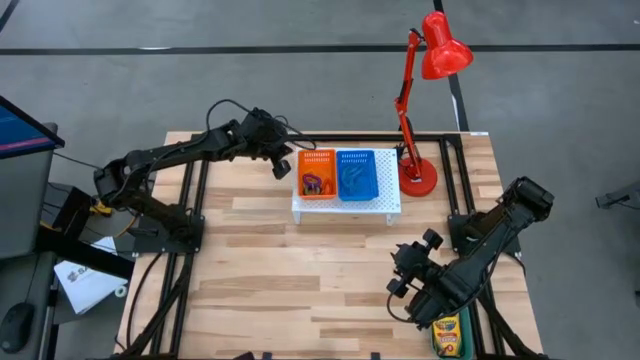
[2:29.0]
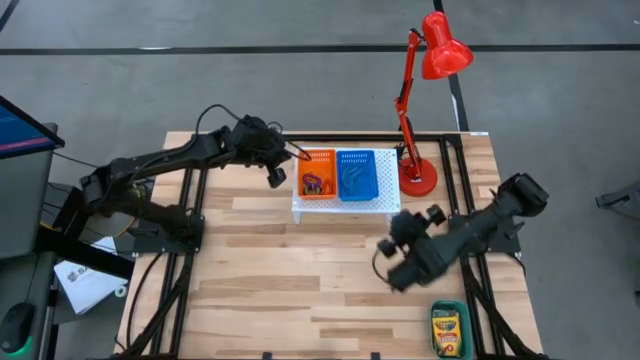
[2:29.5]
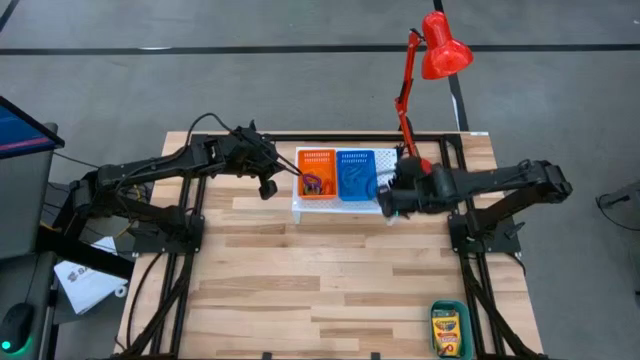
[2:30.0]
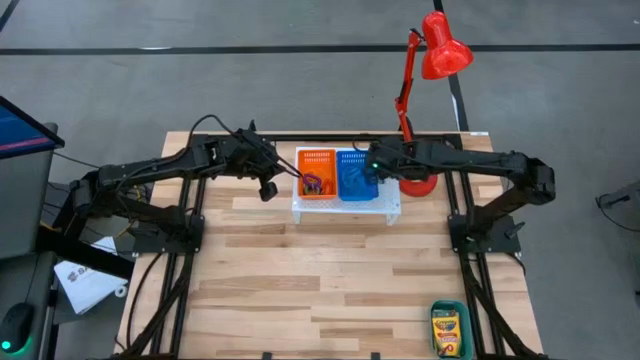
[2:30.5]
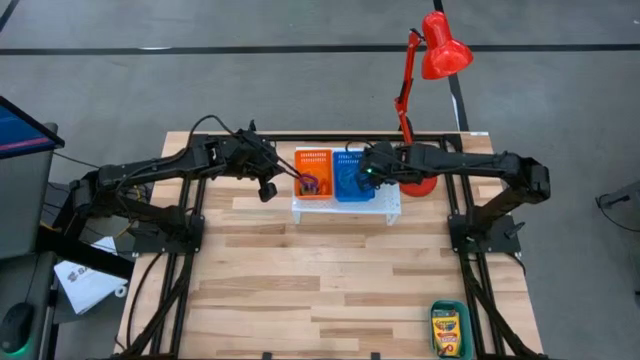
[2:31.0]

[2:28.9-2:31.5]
Task: Pick & Place Office Desk Supplies
Adjust the blue bin on the shelf

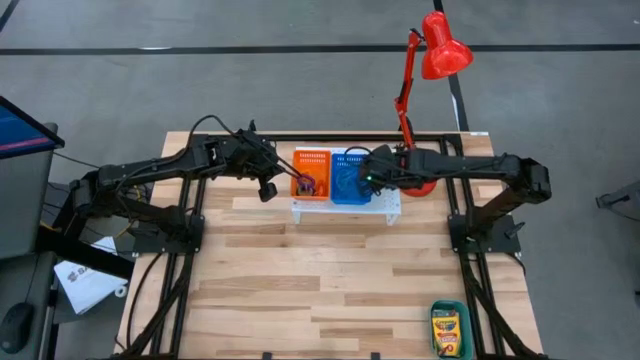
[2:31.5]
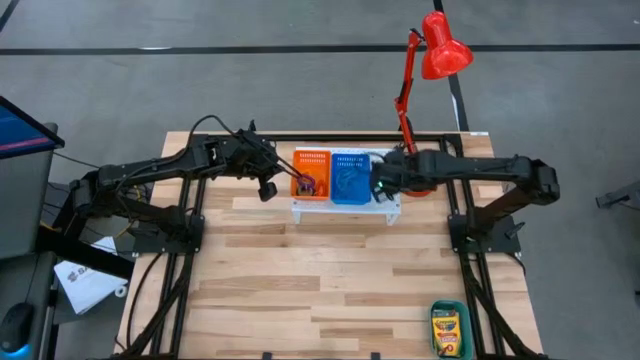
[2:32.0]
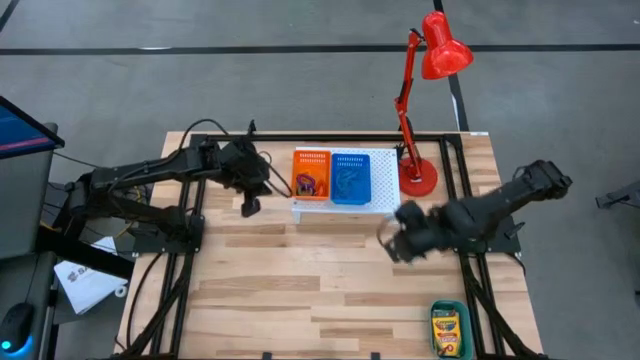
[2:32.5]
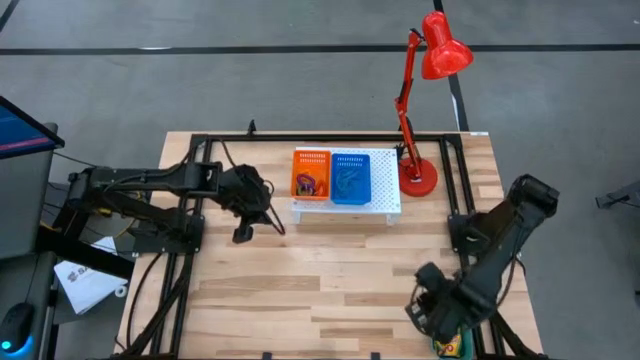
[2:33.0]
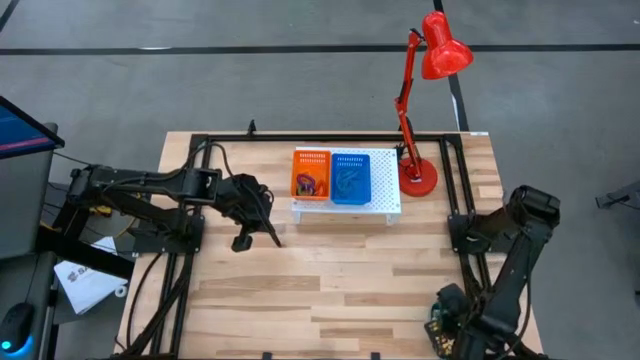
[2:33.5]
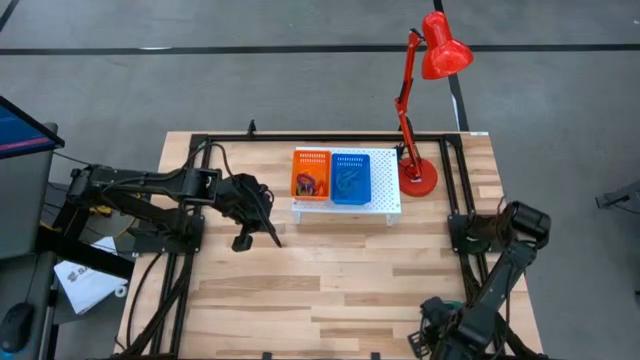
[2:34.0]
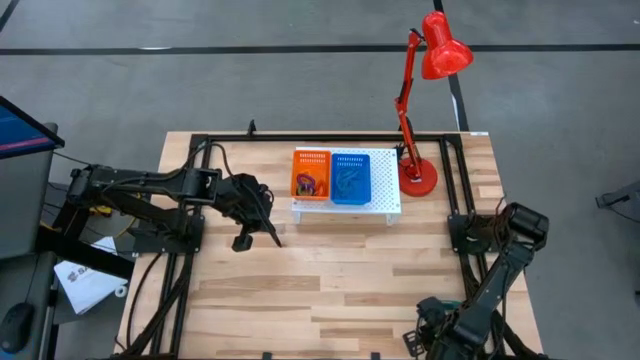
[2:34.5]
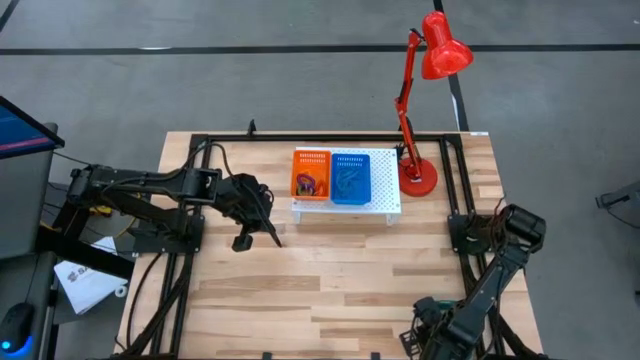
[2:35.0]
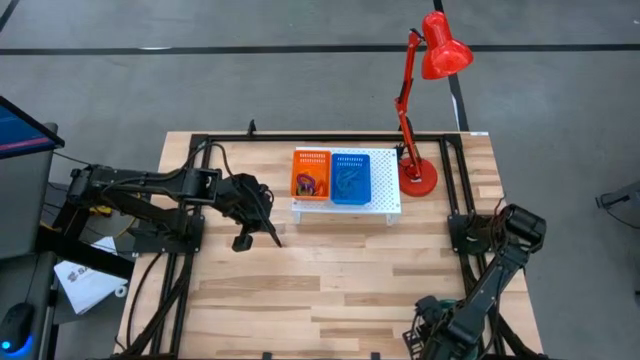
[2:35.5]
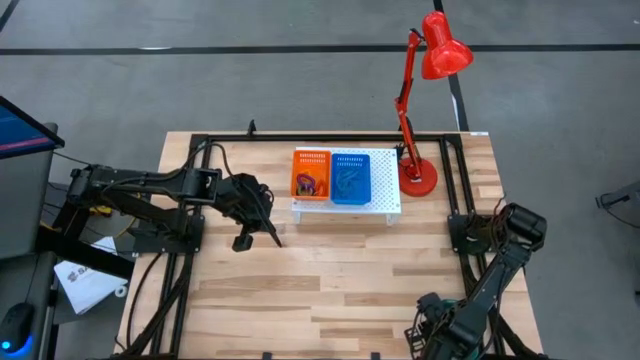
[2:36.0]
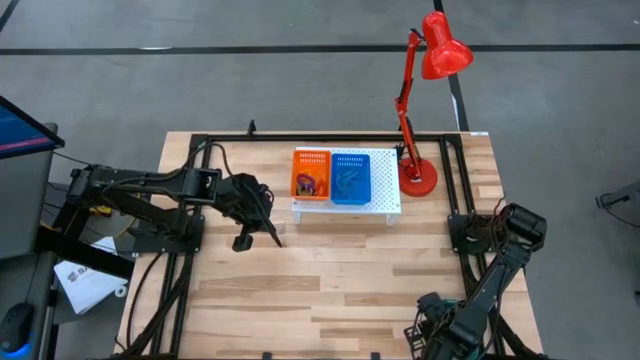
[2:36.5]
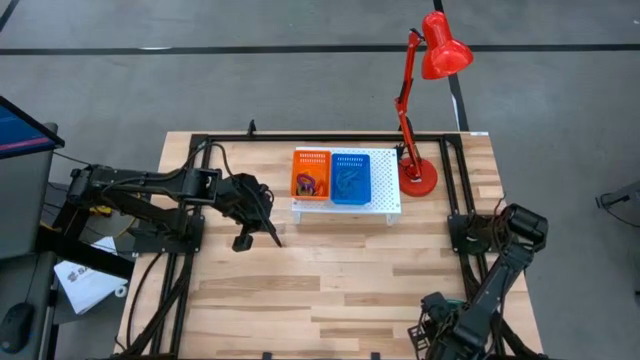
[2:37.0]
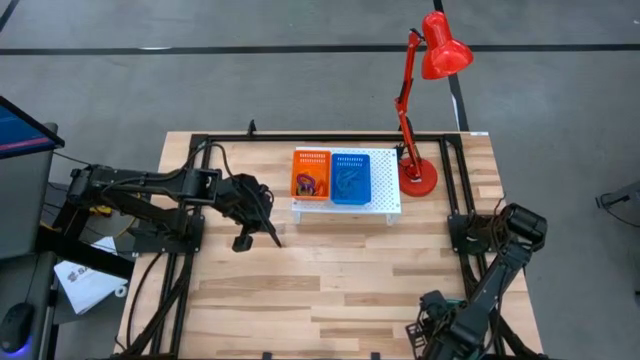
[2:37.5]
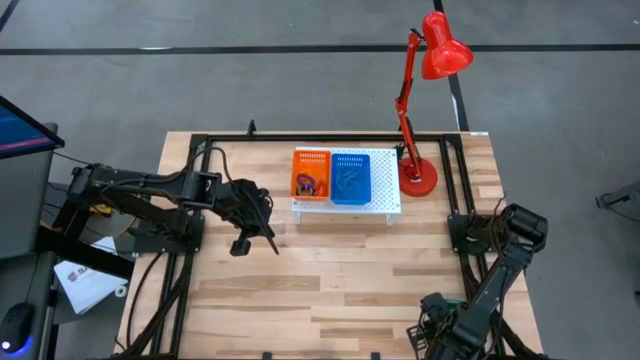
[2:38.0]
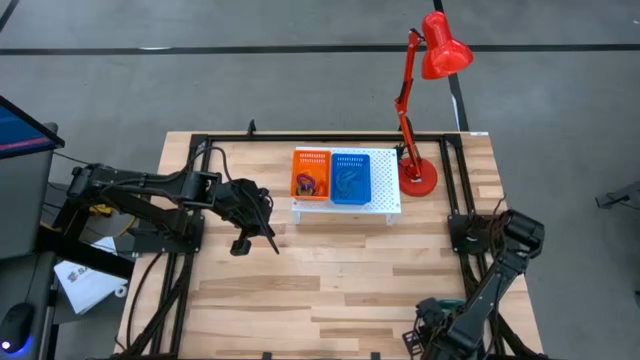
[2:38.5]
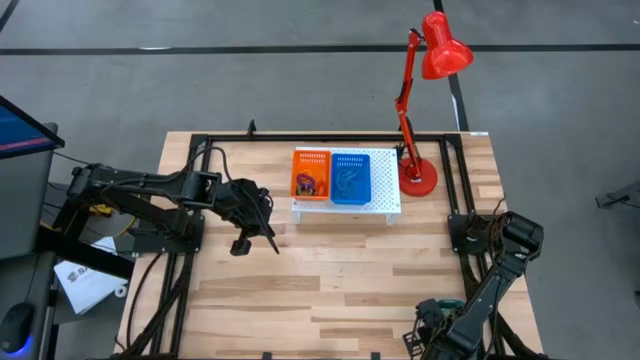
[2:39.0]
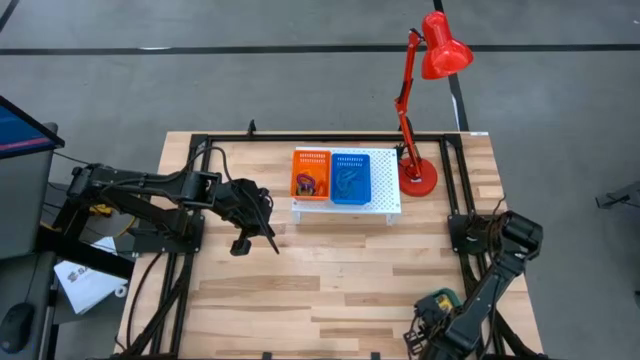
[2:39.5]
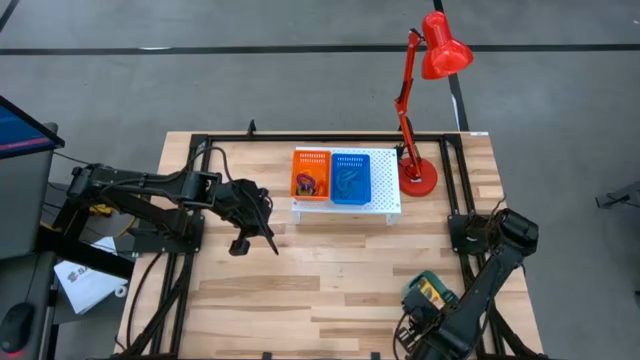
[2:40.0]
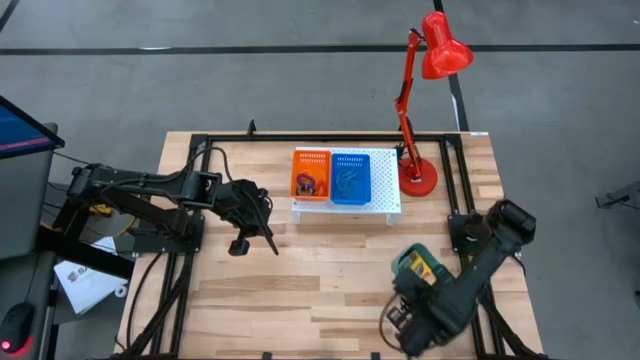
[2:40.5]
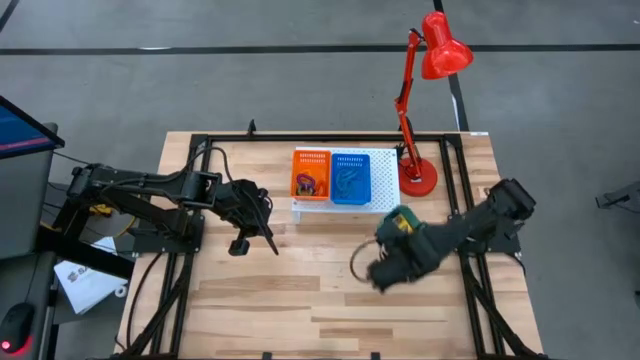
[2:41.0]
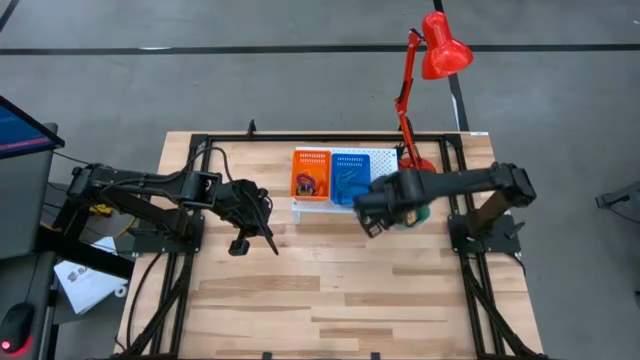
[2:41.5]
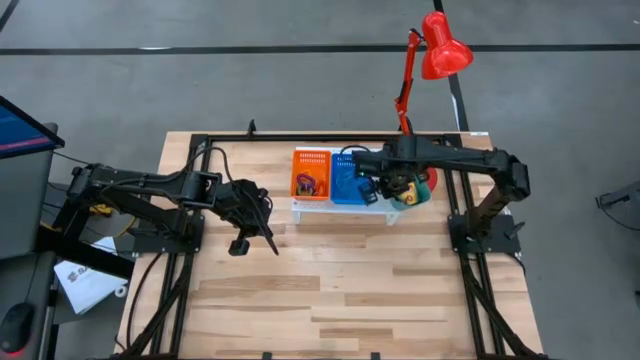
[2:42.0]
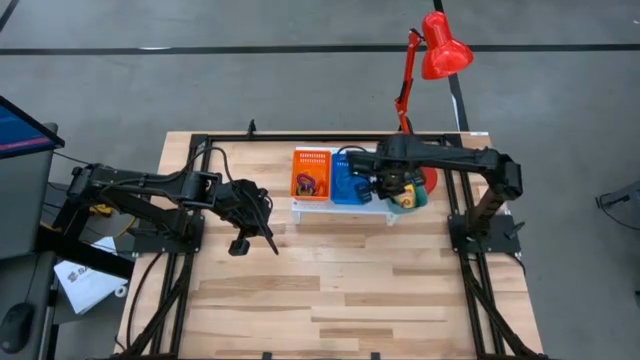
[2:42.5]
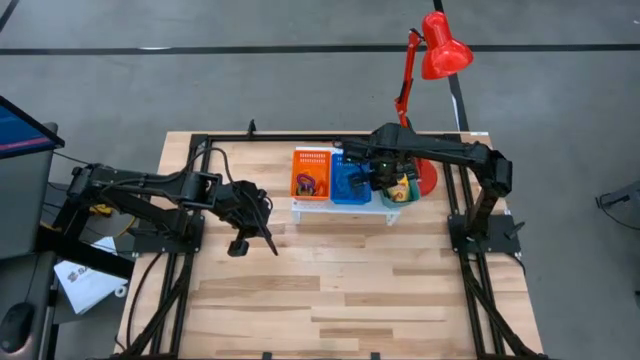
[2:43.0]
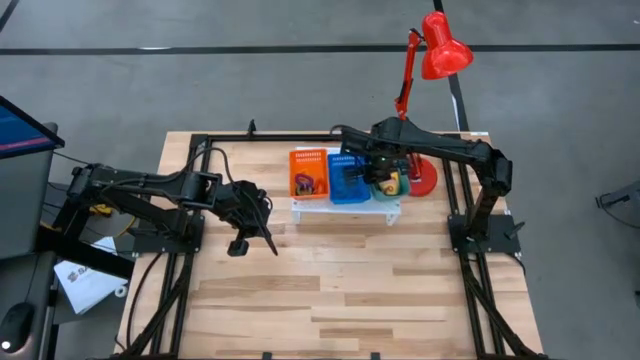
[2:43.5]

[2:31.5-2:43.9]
Put the green bin on the shelf

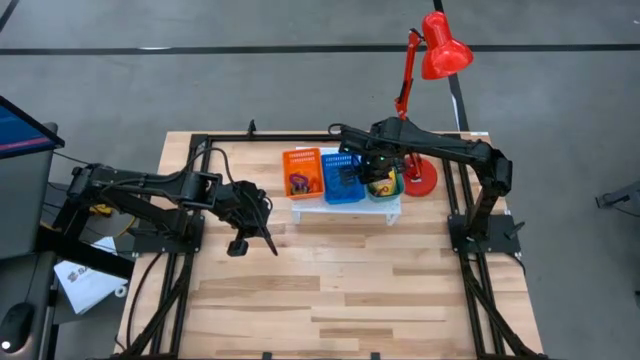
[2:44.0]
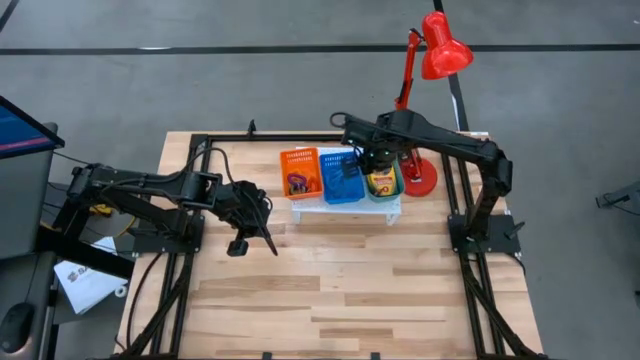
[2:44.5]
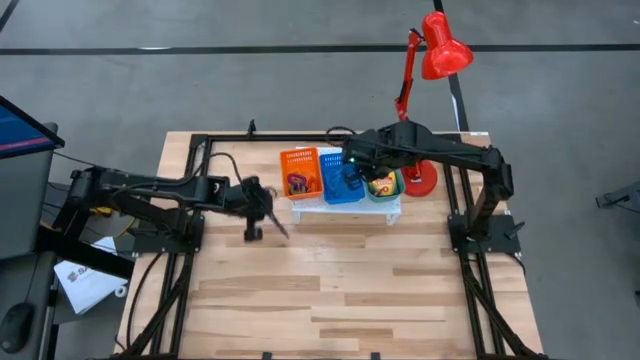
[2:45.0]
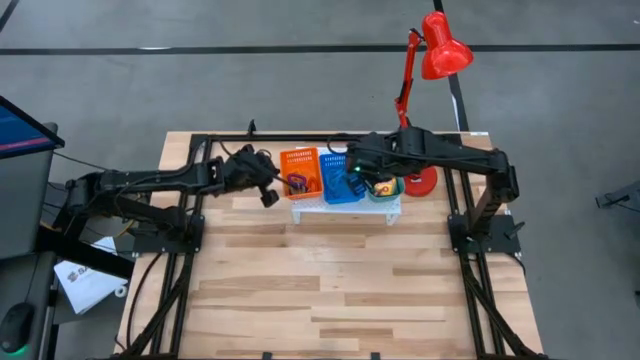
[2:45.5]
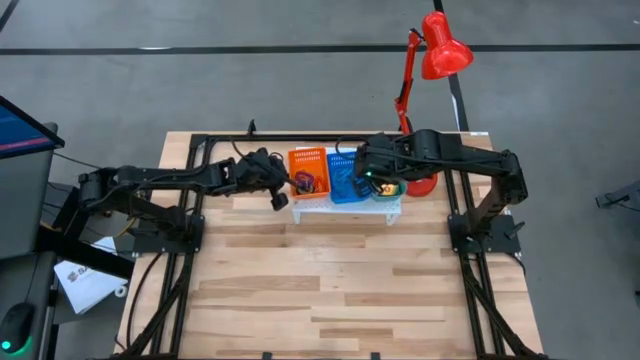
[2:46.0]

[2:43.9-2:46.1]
Adjust the orange bin on the shelf

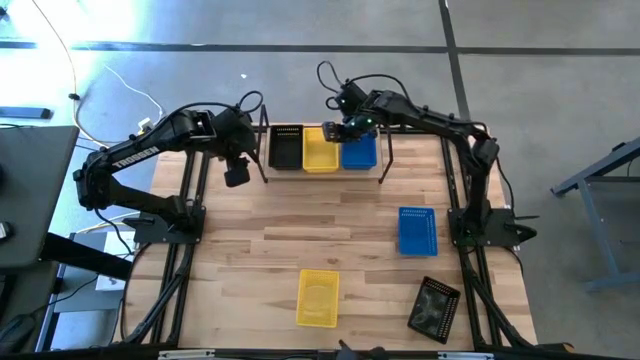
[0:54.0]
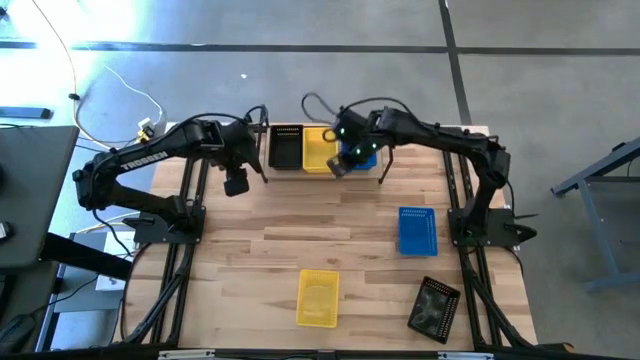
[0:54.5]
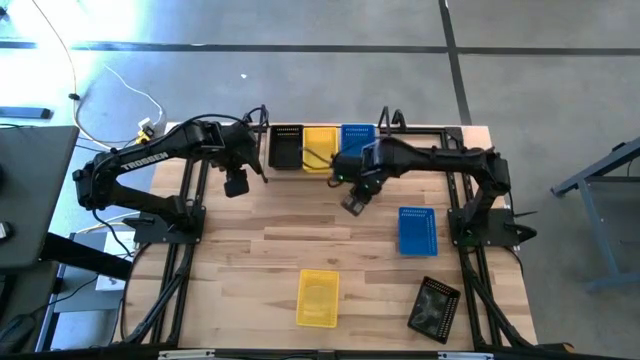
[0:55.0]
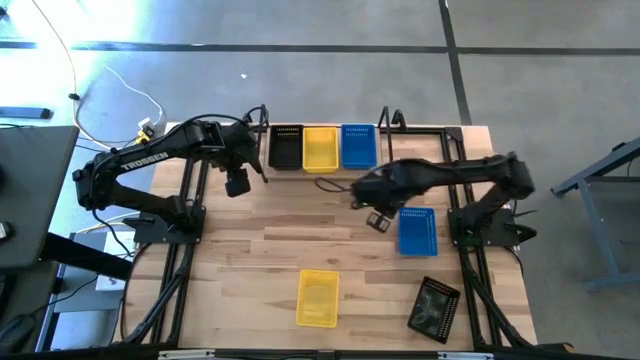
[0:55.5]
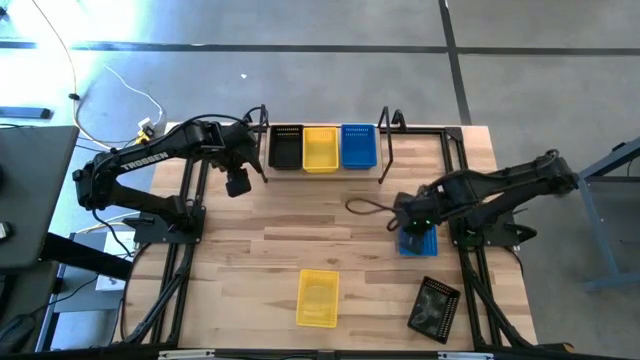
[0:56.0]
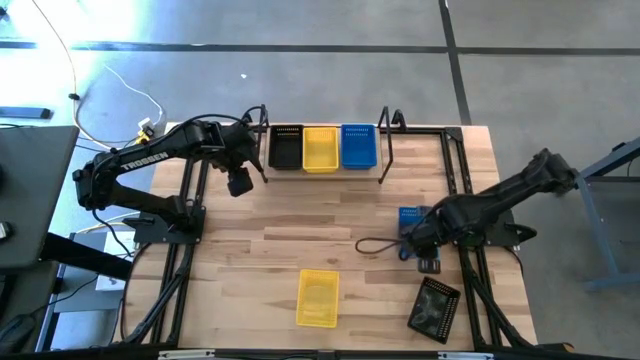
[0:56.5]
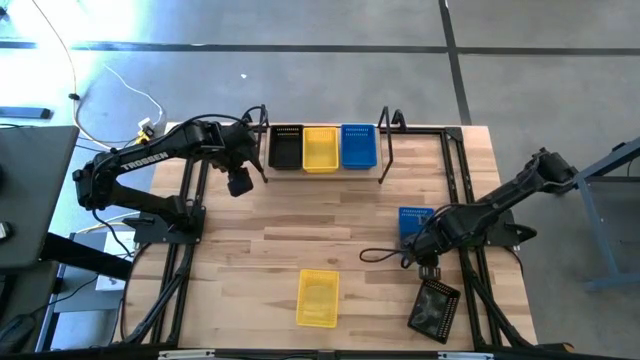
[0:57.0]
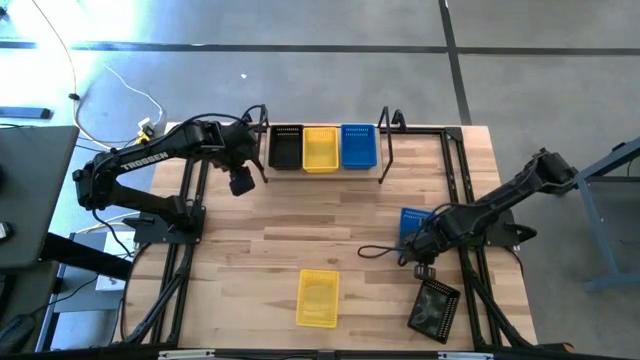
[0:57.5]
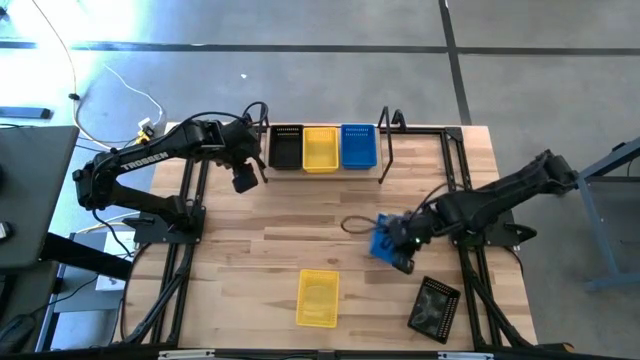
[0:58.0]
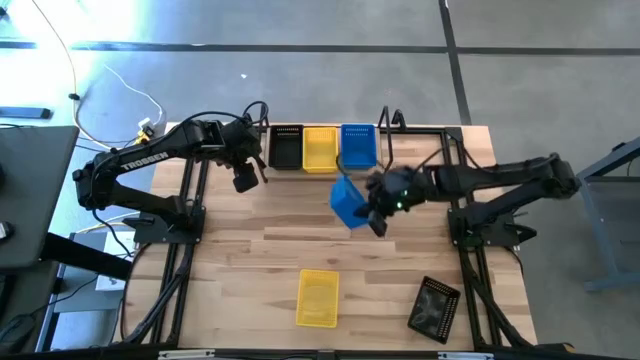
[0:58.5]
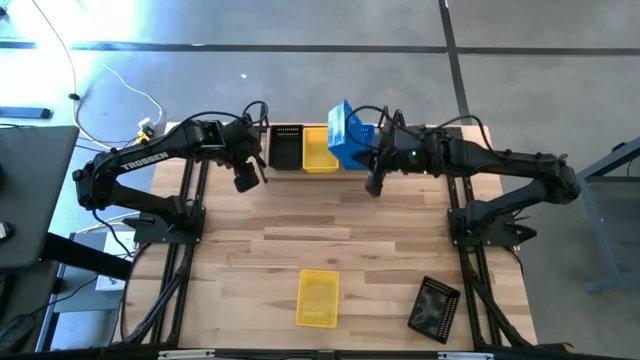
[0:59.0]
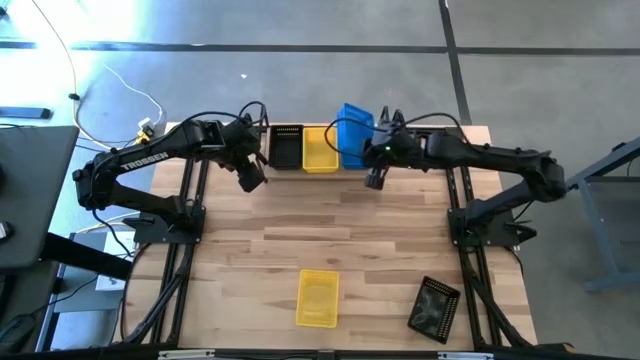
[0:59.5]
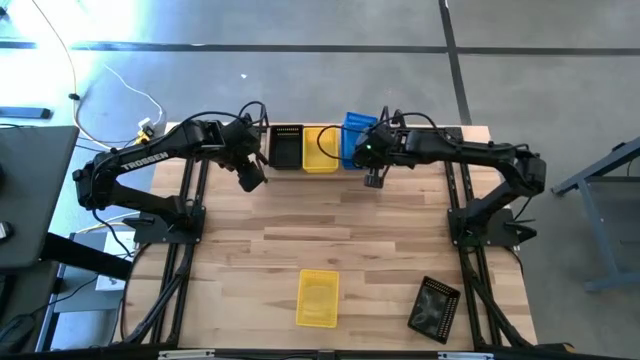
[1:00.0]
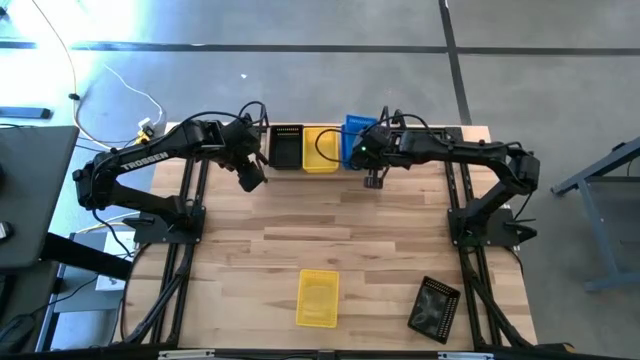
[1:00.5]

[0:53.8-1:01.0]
Task: Stack baskets on shelf by color
Stack the blue bin on top of the blue bin on the shelf
